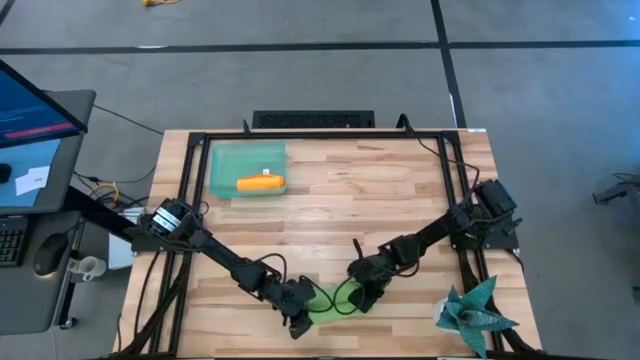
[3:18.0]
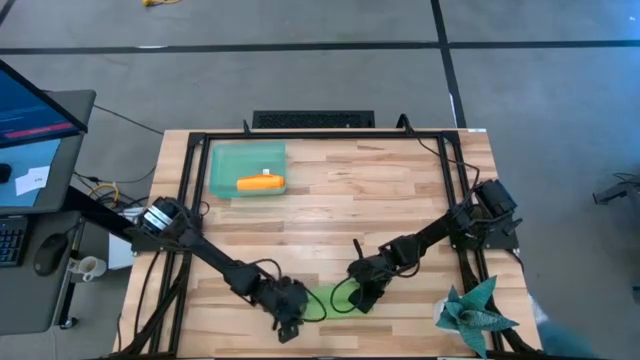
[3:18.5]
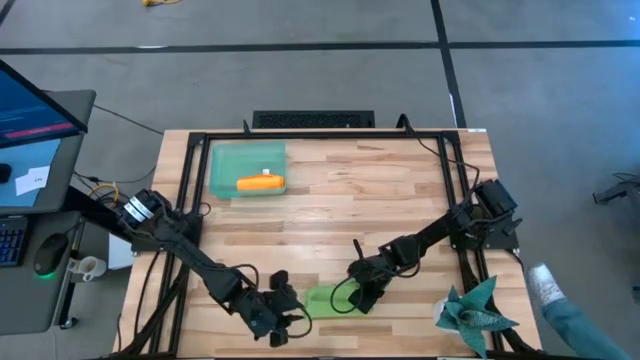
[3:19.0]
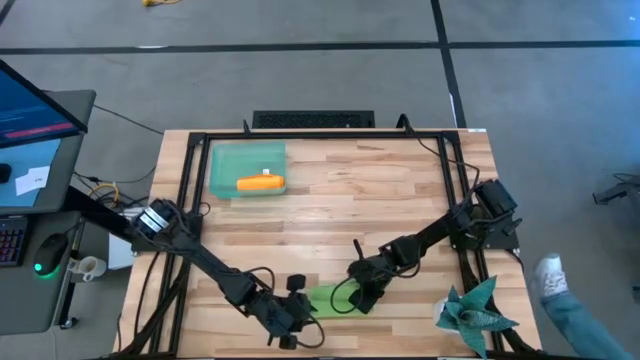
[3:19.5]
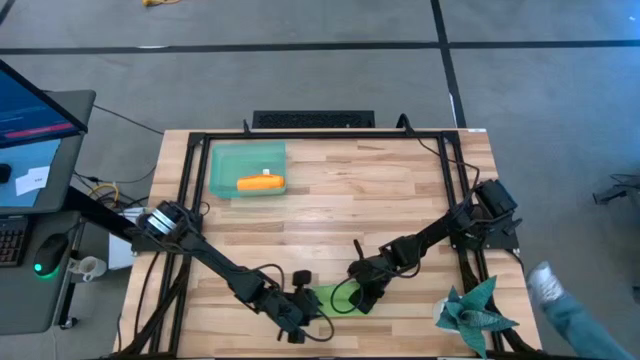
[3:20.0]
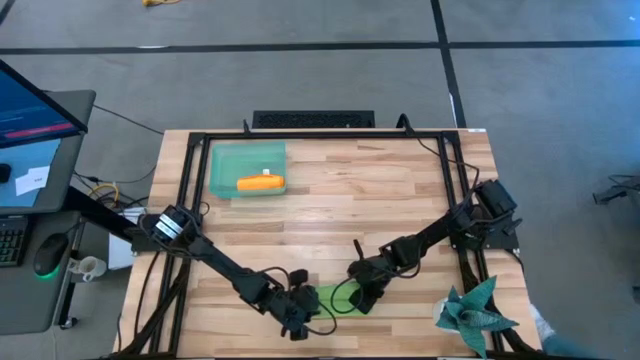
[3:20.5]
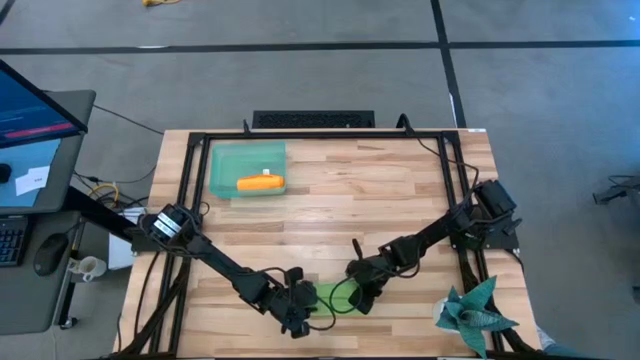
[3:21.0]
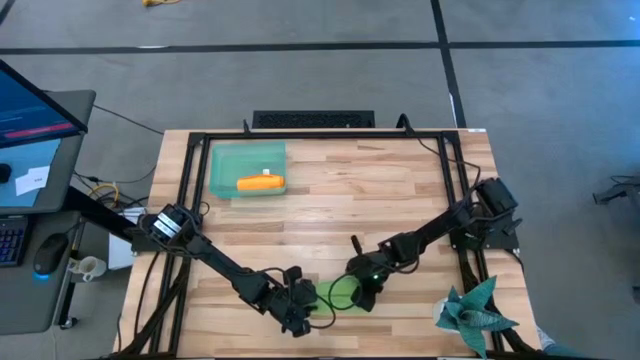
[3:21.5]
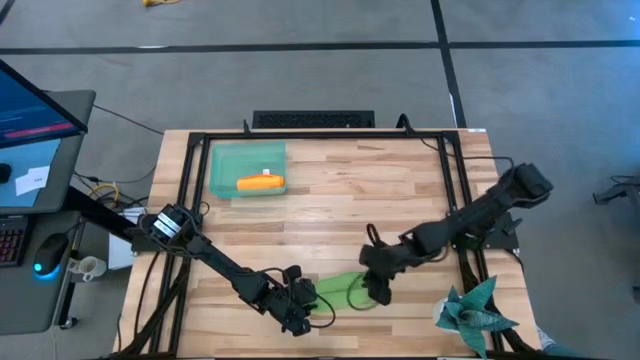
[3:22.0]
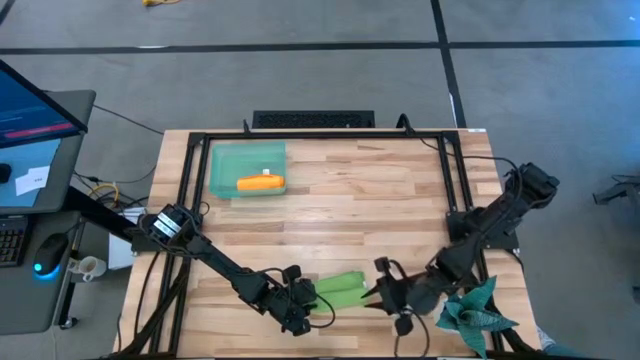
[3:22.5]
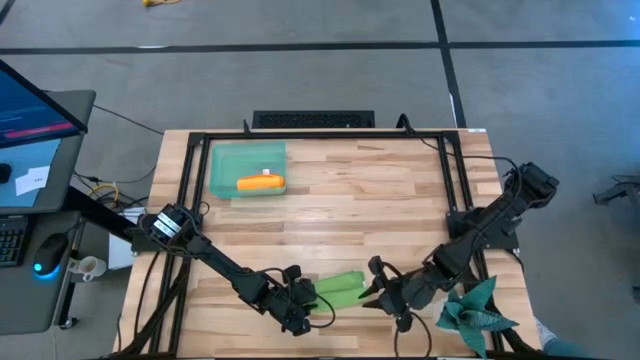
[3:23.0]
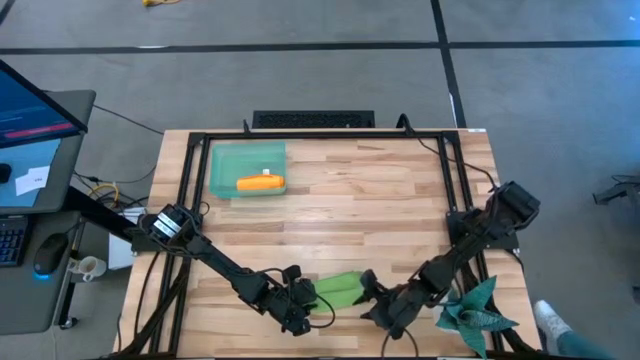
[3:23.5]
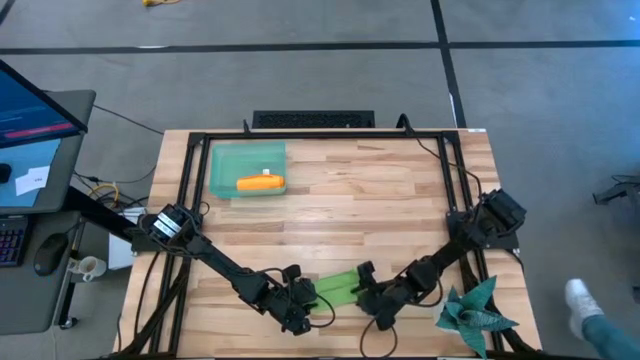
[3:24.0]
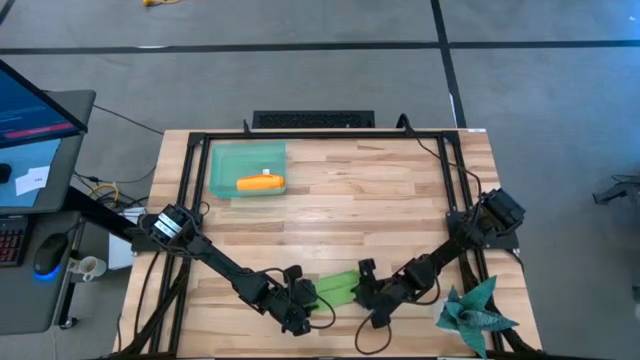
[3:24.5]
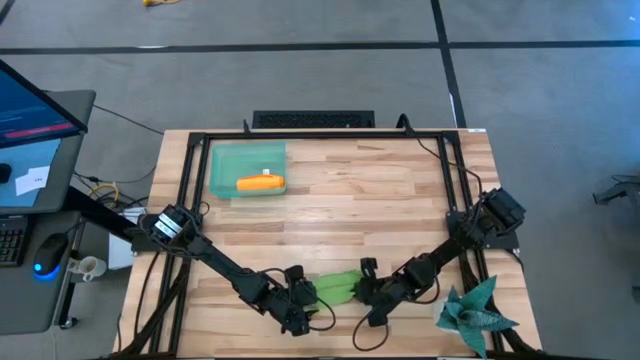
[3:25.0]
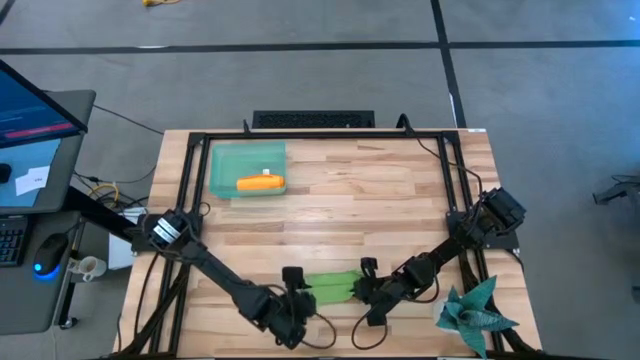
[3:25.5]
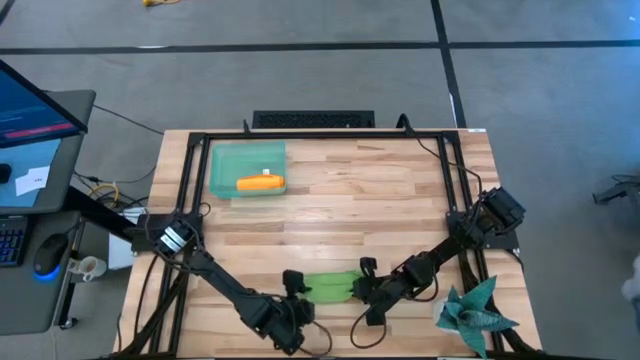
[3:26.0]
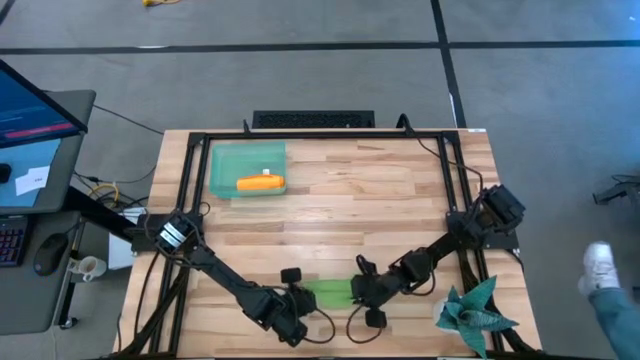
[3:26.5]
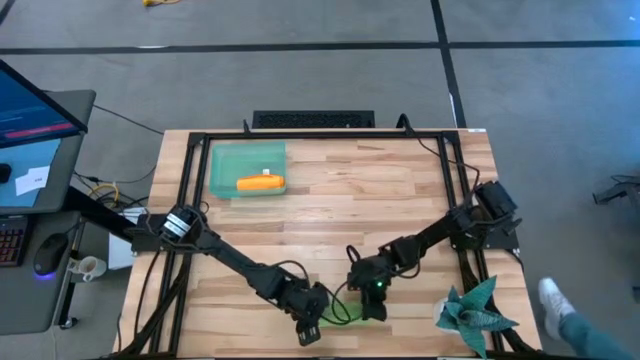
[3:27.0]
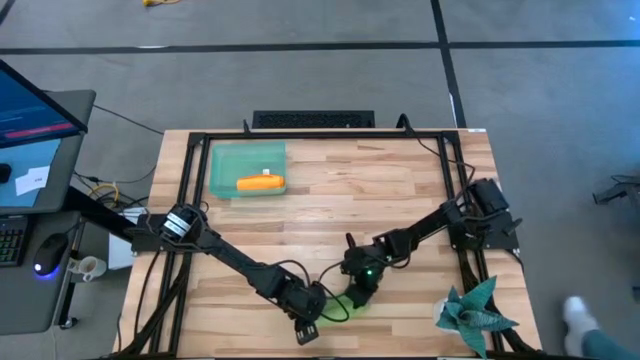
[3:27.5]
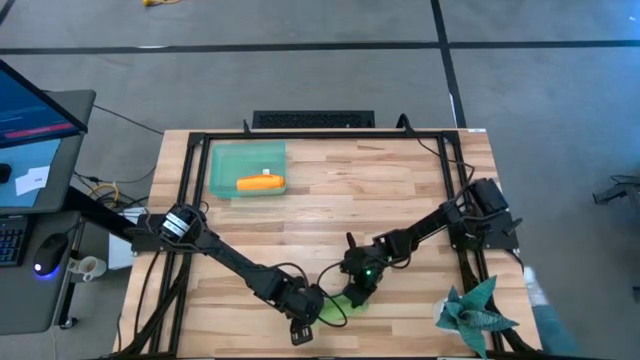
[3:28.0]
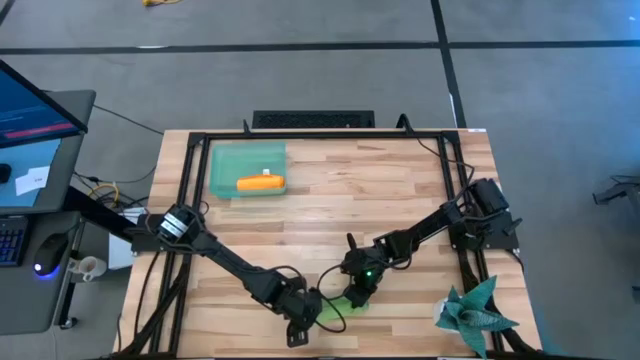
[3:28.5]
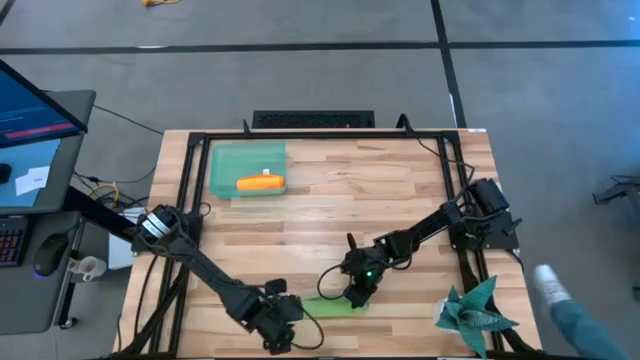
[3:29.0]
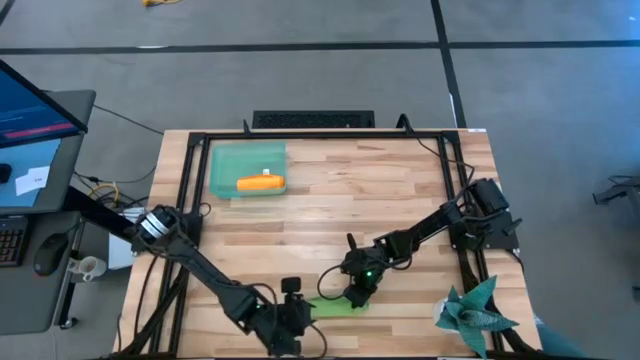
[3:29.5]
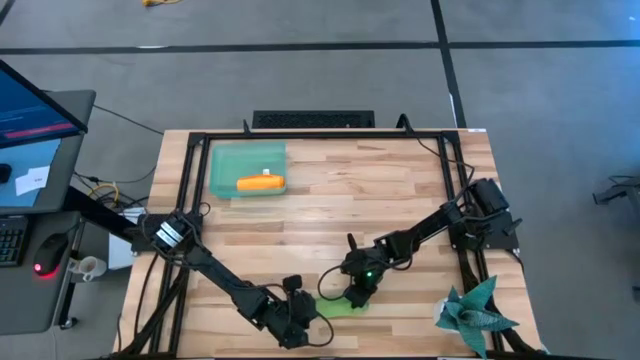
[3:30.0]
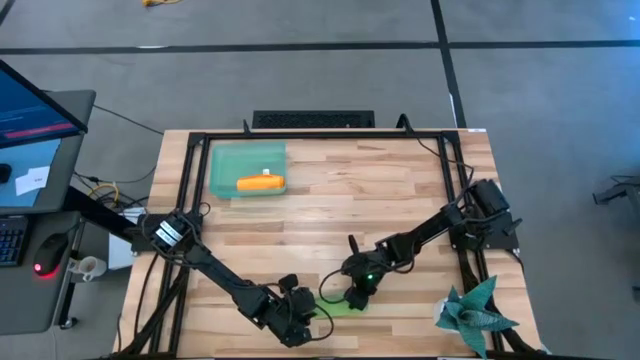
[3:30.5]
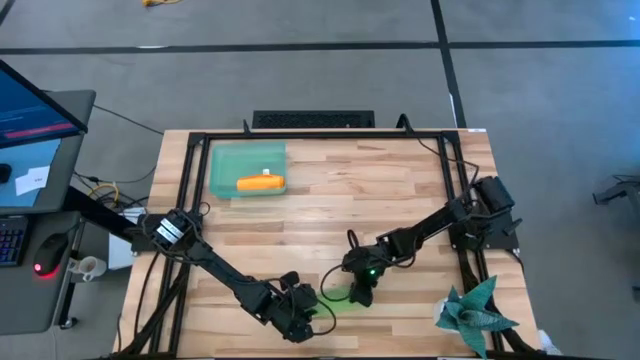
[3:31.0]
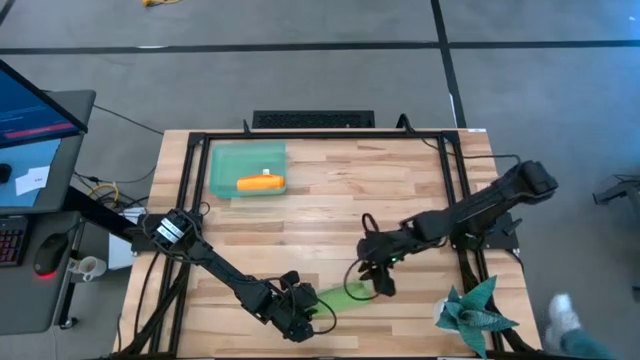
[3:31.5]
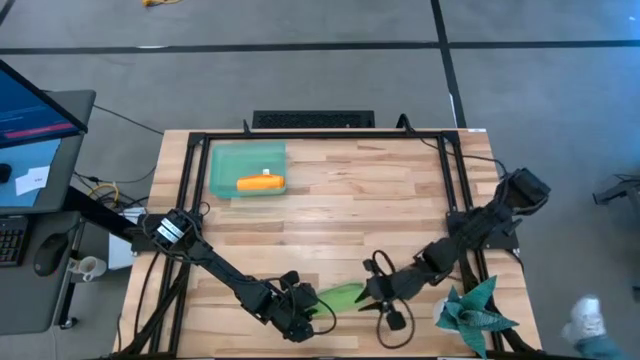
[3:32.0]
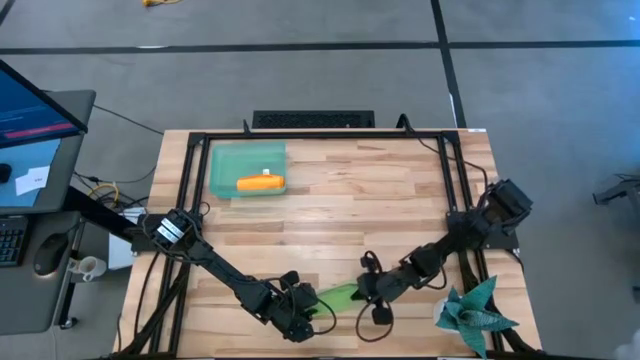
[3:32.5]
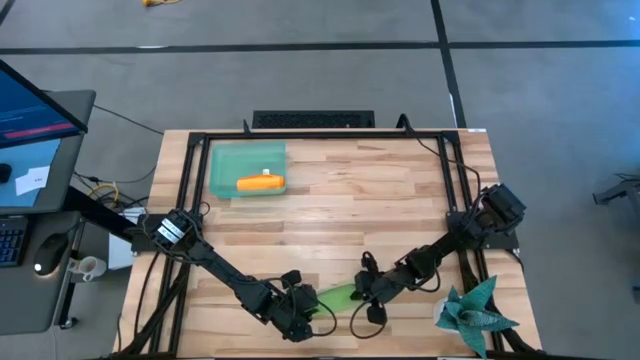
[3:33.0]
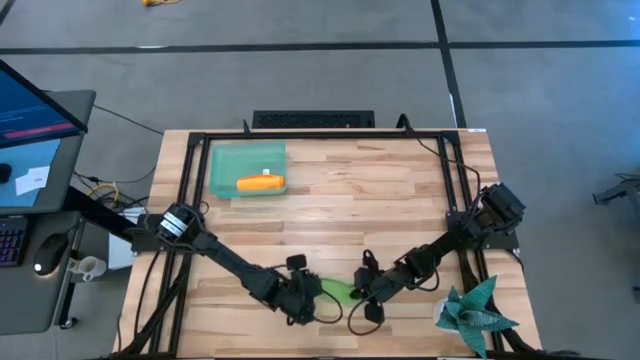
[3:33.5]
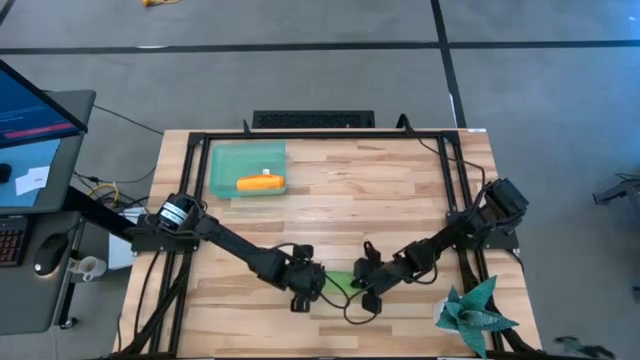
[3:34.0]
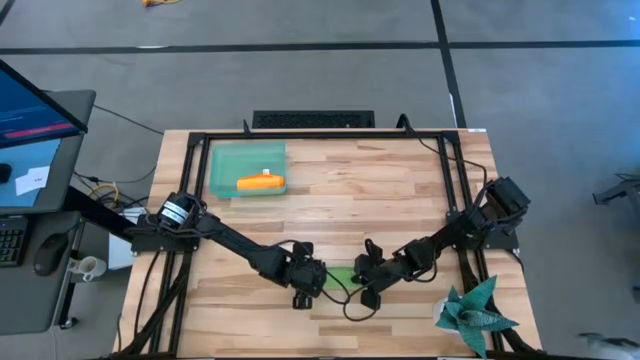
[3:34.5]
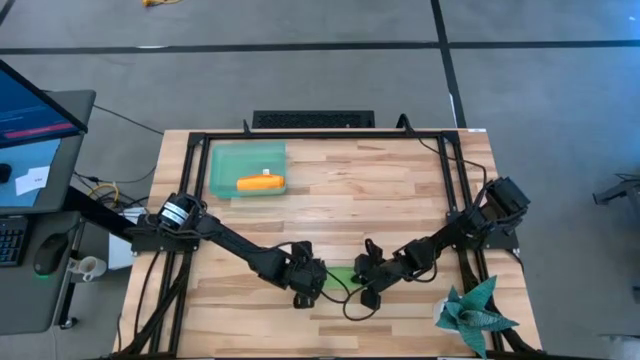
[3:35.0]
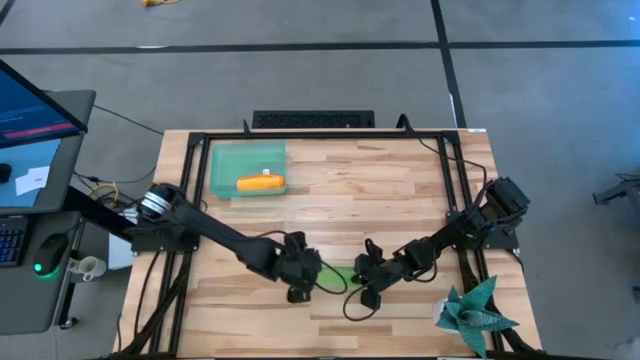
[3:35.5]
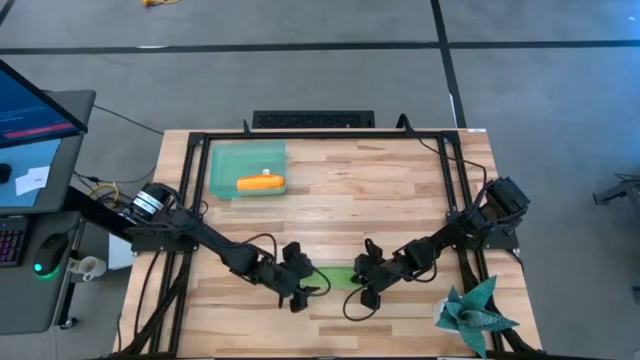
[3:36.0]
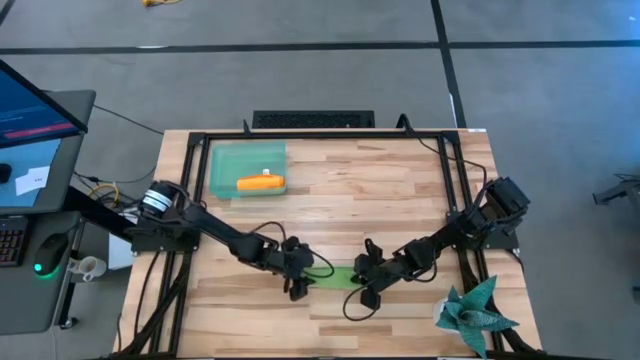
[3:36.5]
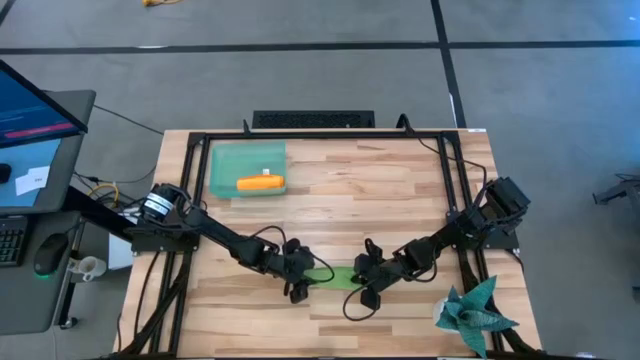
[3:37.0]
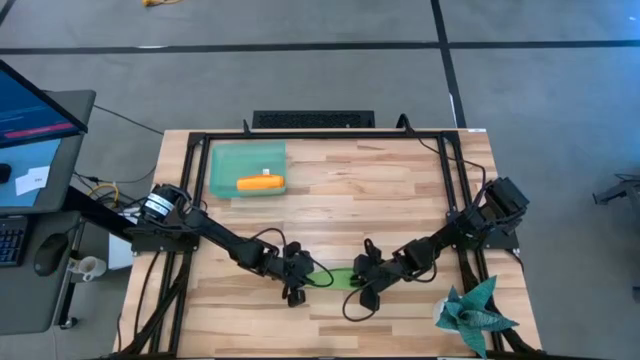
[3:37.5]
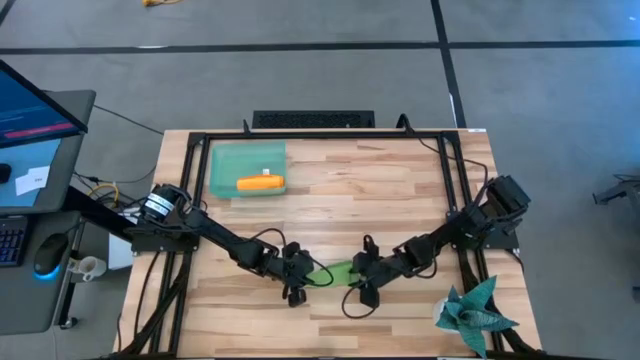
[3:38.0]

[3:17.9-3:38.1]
Task: Roll microfiber towels into tight, uniform cylinder then place into a basket
Roll the green microfiber cloth

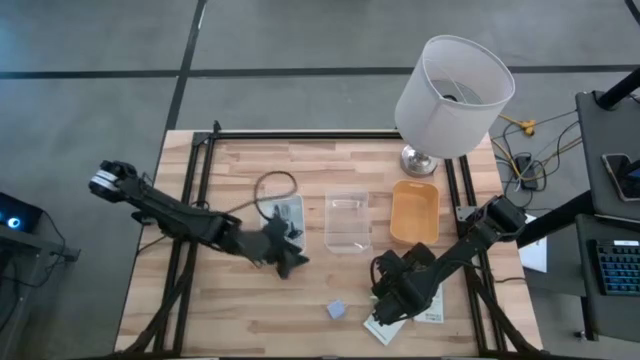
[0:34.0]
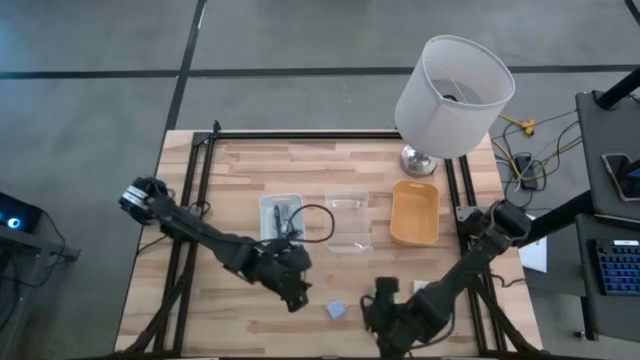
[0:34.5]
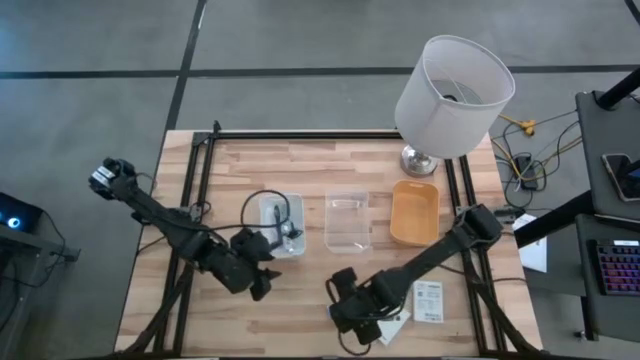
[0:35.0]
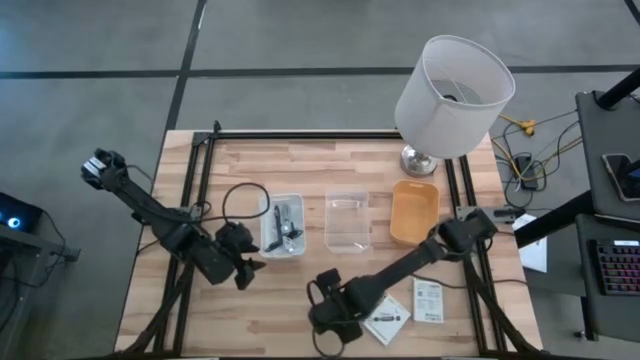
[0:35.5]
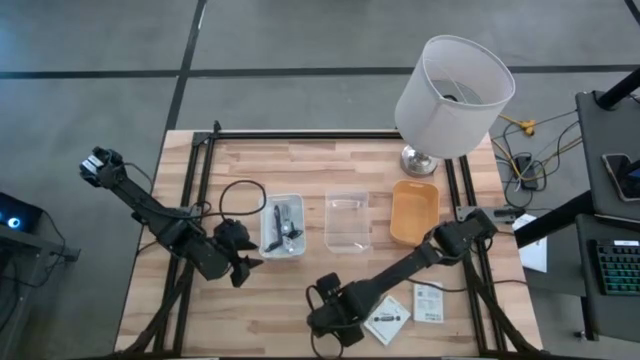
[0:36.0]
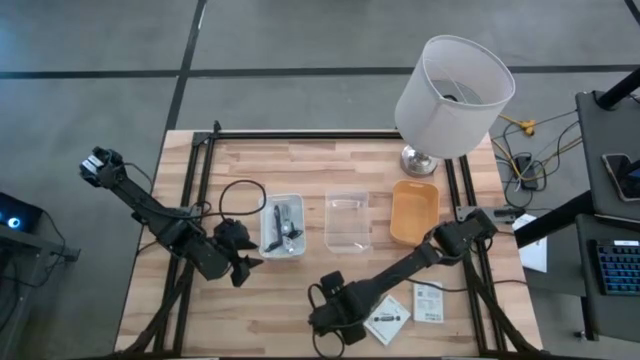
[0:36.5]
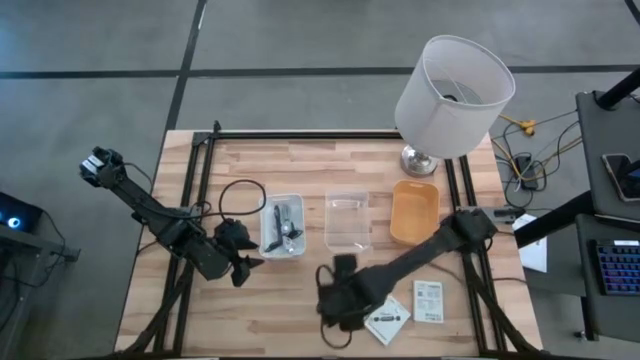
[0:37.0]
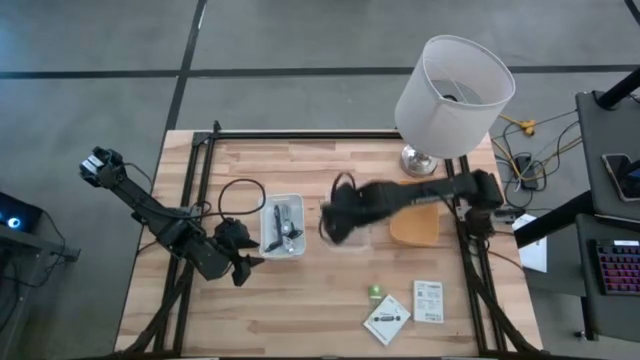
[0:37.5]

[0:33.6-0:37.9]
Task: Pick and place items into bin
Put the light purple charger adapter into the transparent bin
